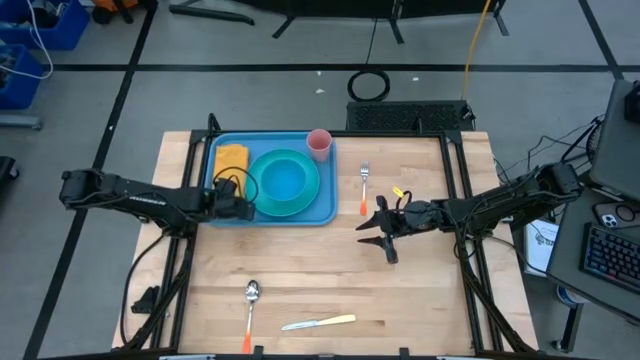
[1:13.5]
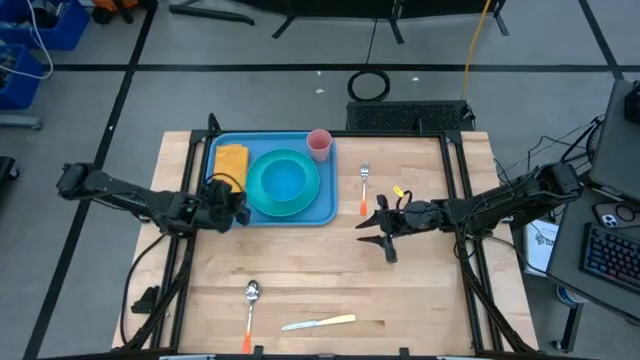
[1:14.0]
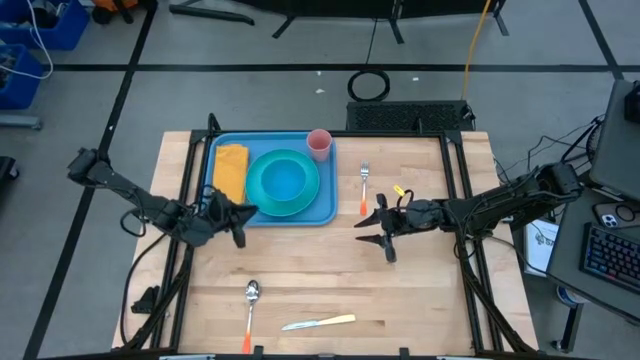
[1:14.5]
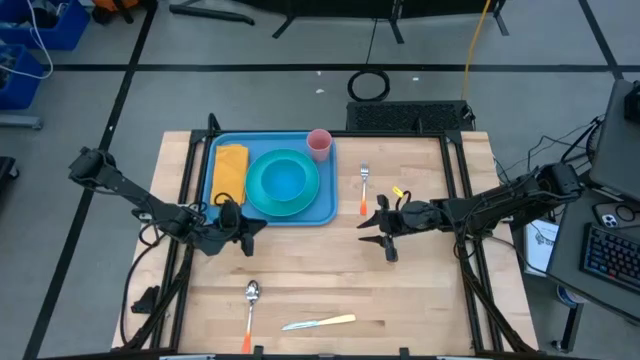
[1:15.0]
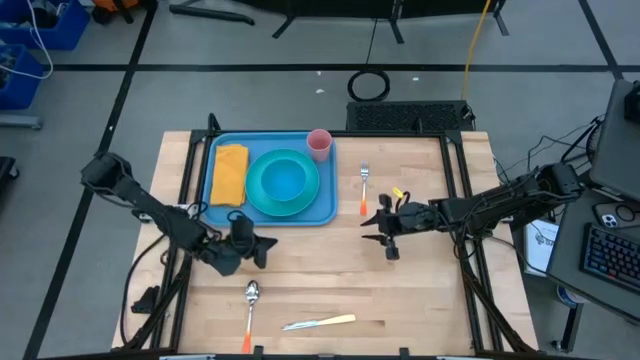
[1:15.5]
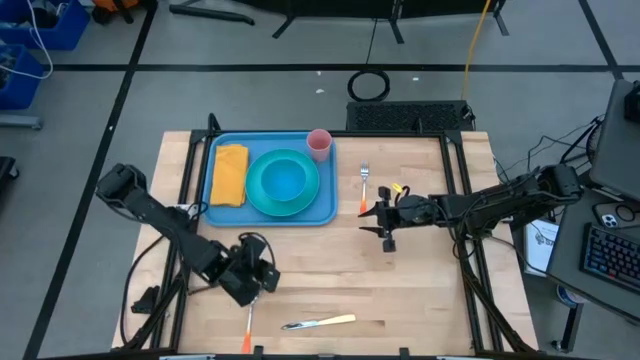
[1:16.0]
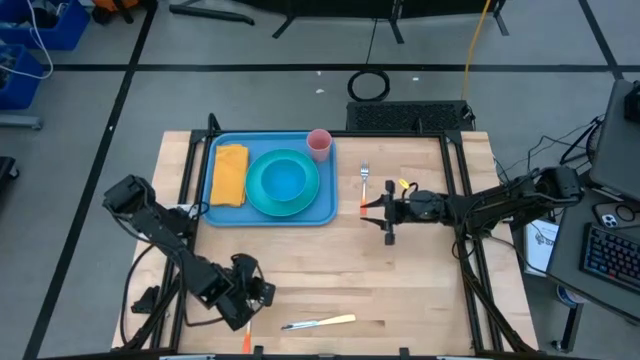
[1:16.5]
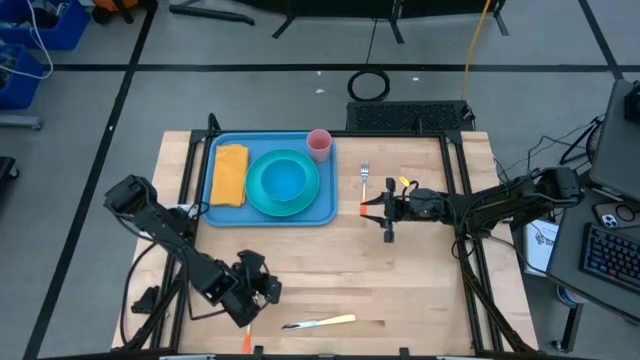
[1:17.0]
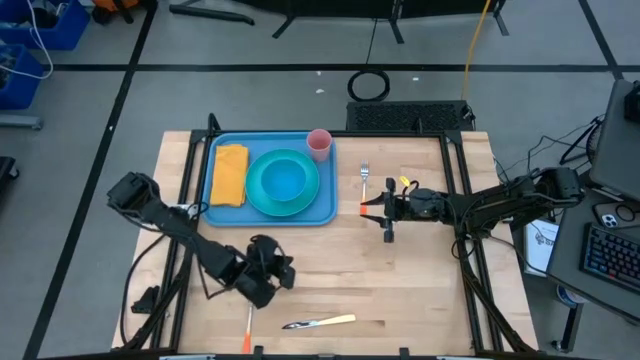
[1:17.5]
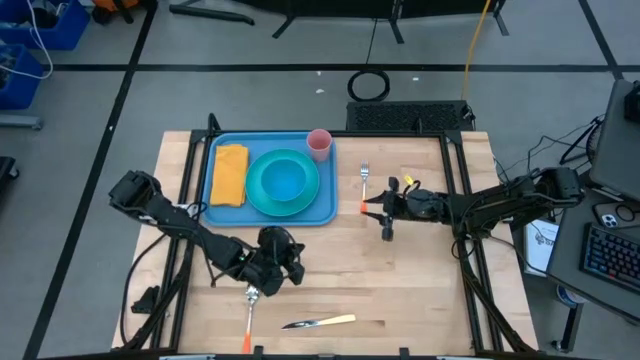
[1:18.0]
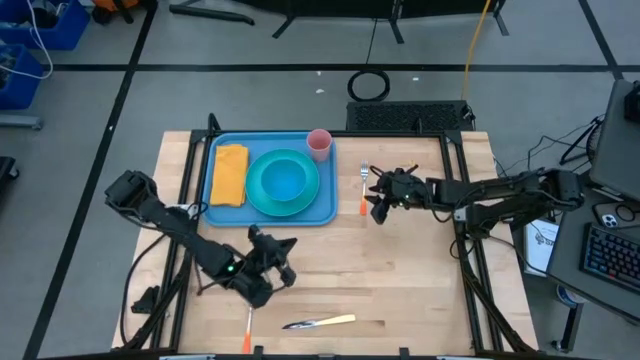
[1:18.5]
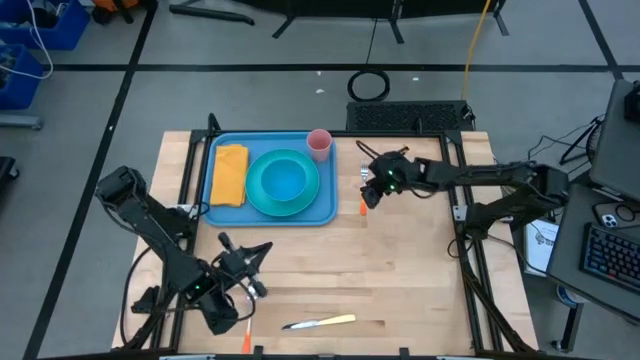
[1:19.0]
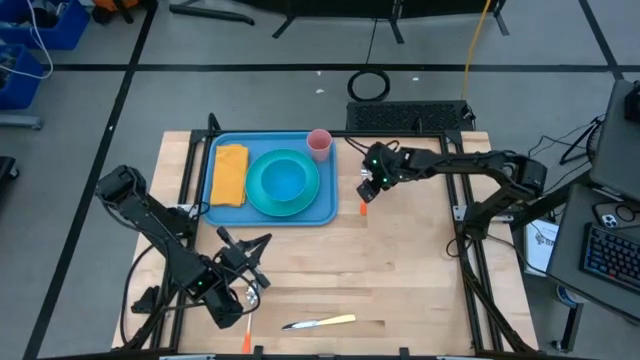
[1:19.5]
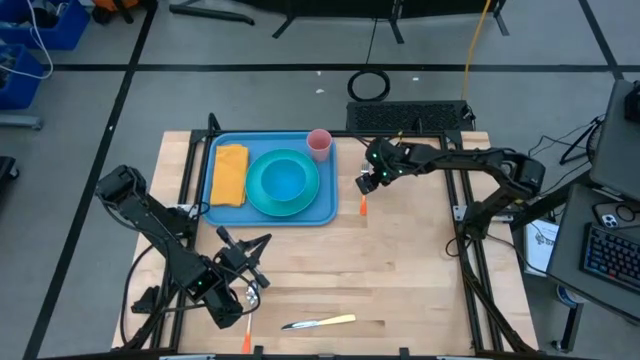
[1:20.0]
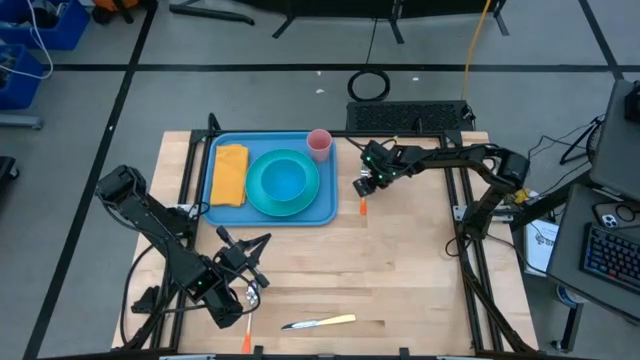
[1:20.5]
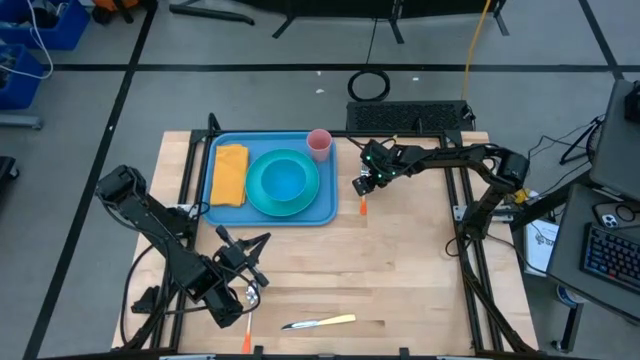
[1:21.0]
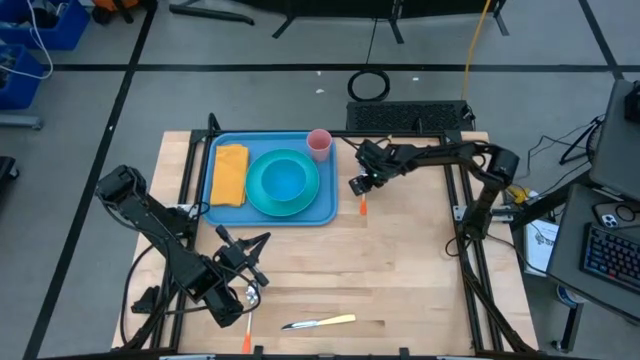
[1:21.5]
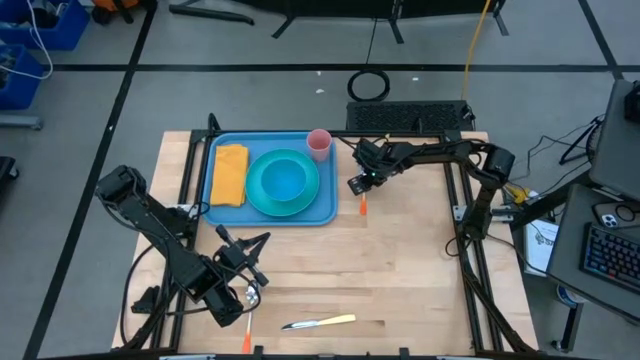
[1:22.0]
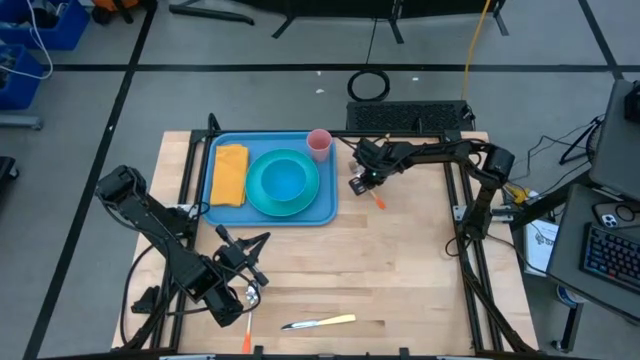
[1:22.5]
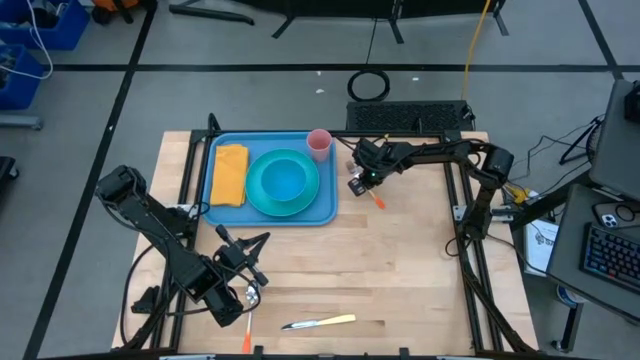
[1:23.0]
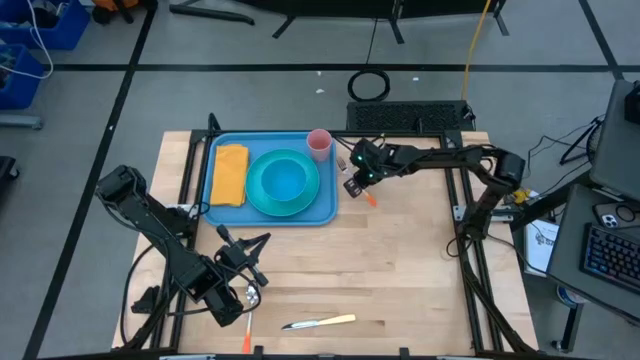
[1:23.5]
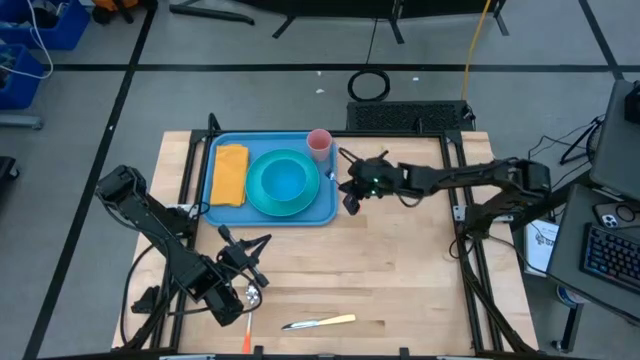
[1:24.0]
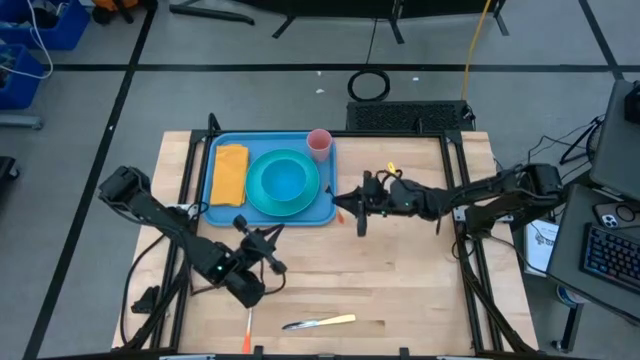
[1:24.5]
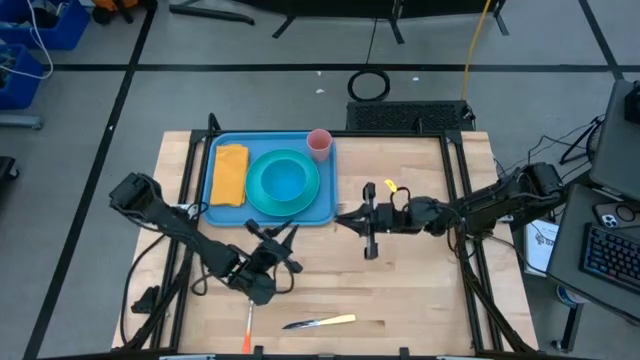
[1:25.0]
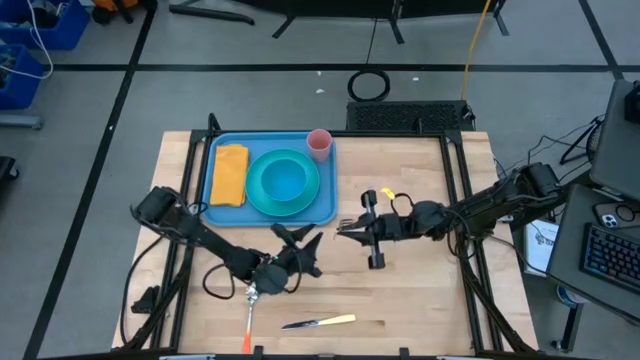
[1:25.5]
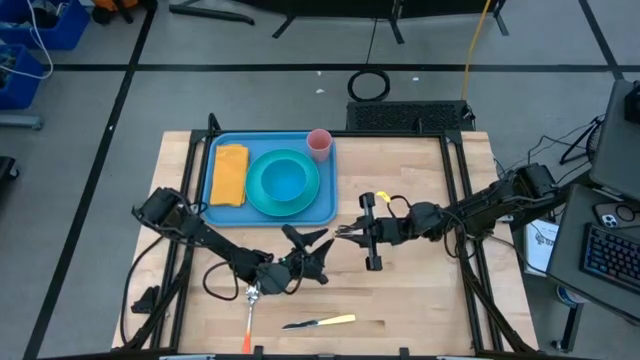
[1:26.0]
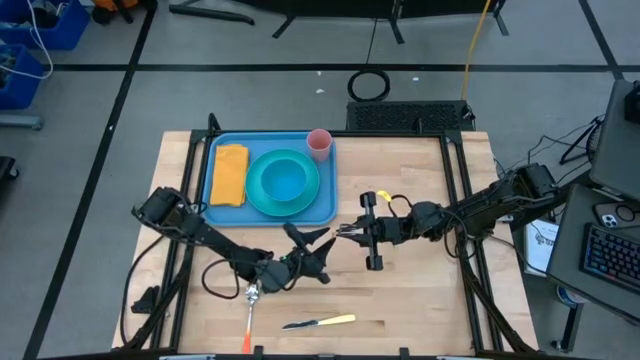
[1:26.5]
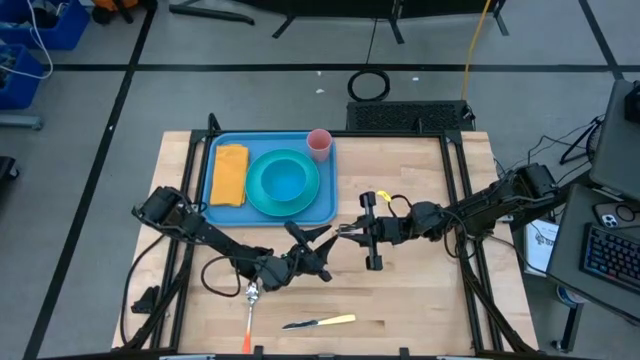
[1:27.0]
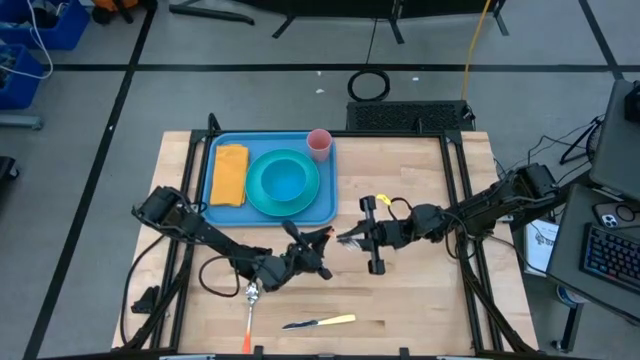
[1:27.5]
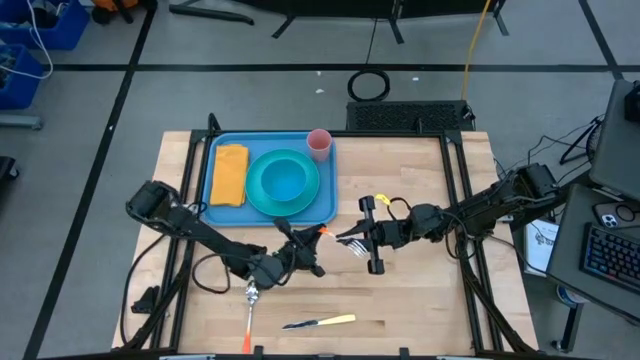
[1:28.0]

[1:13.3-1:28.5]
Task: Set up tray
Put the orange fork on the yellow napkin on the blue serving tray

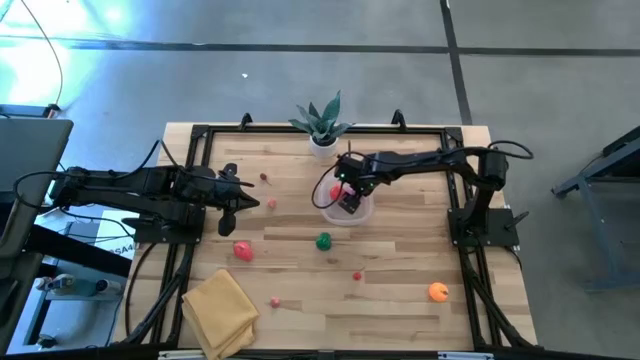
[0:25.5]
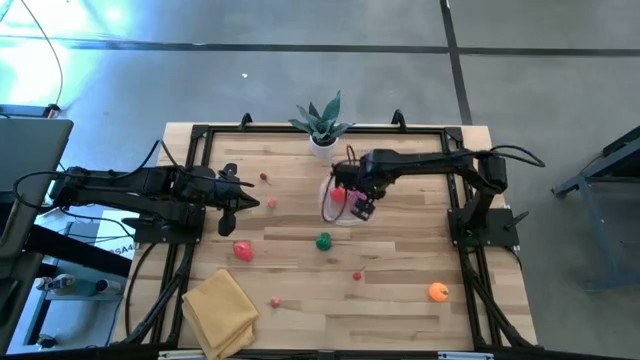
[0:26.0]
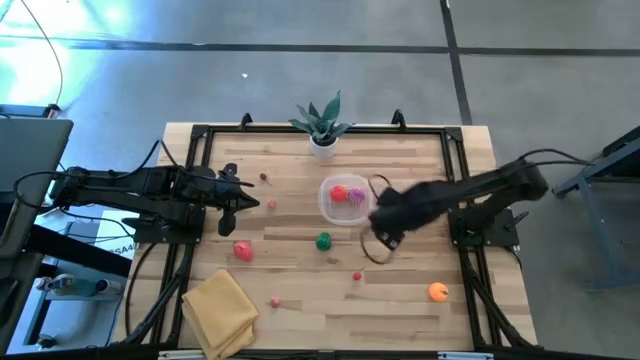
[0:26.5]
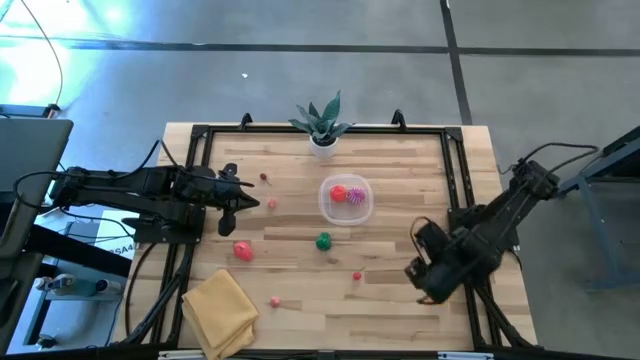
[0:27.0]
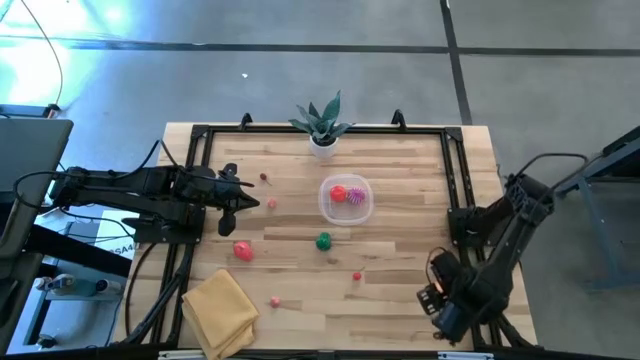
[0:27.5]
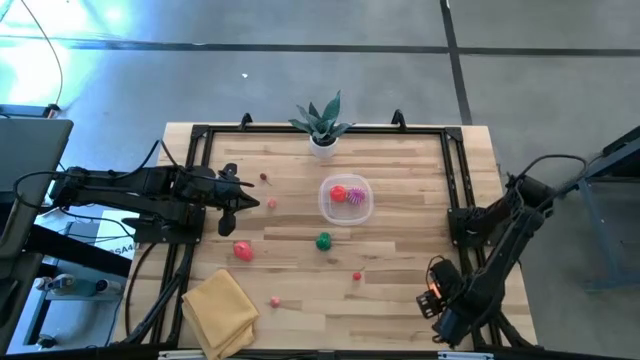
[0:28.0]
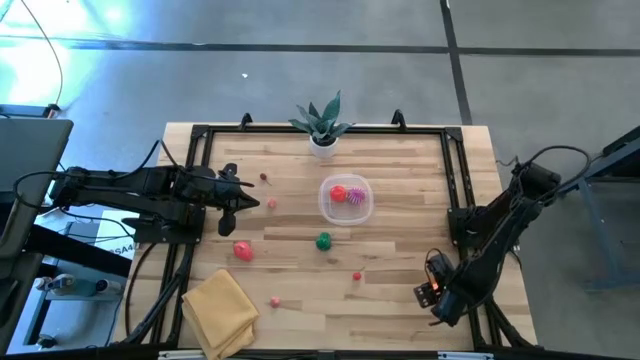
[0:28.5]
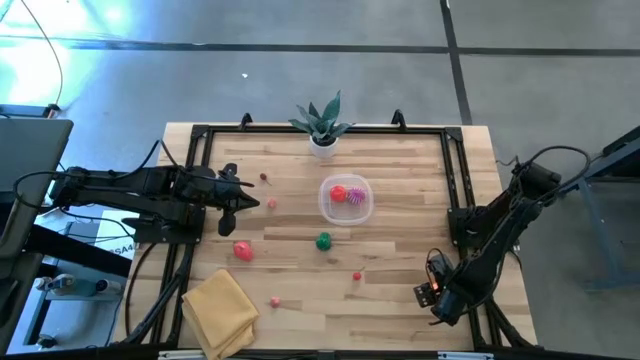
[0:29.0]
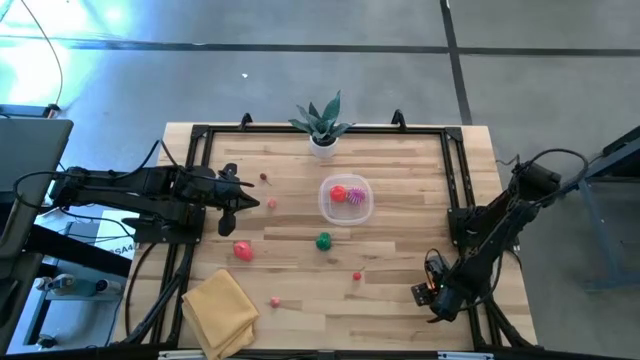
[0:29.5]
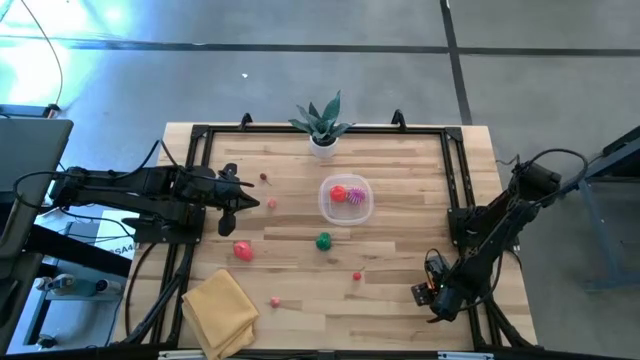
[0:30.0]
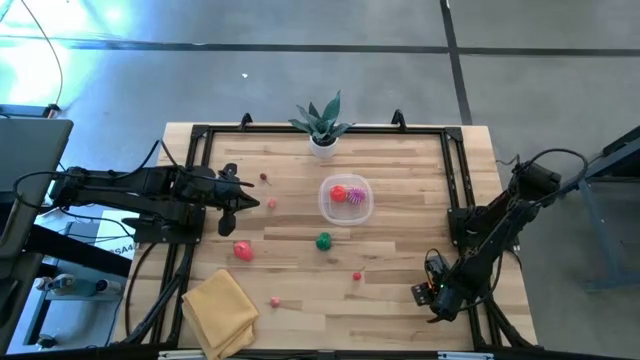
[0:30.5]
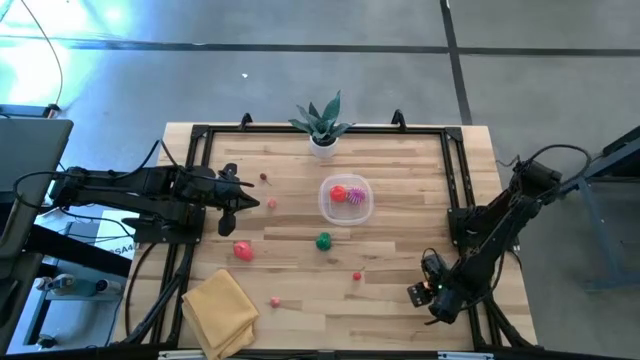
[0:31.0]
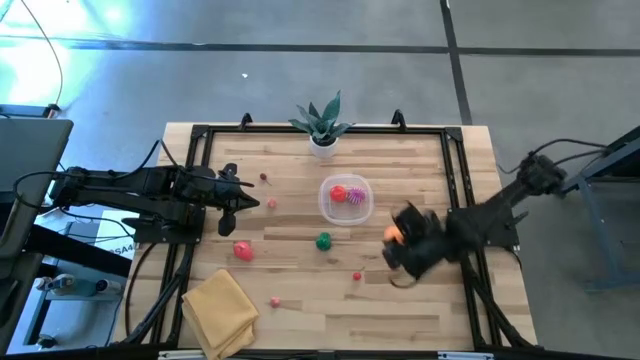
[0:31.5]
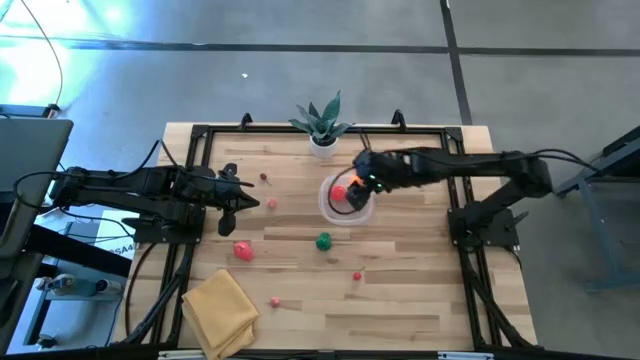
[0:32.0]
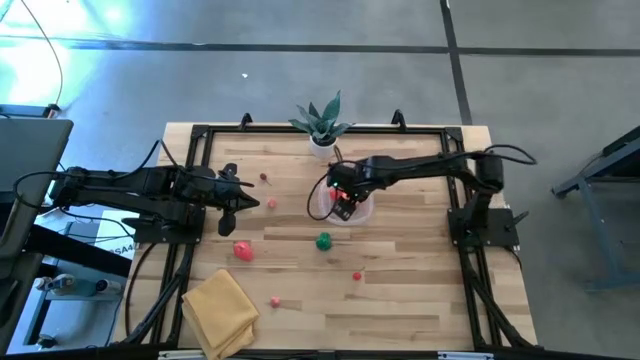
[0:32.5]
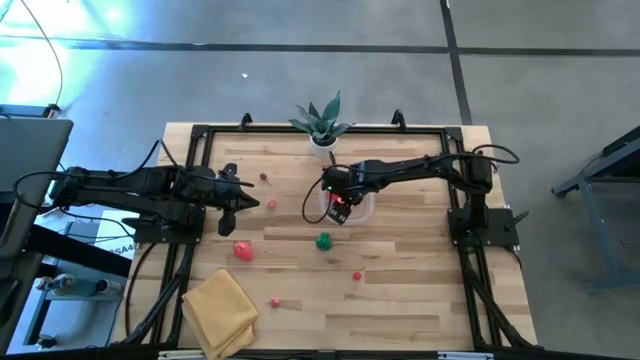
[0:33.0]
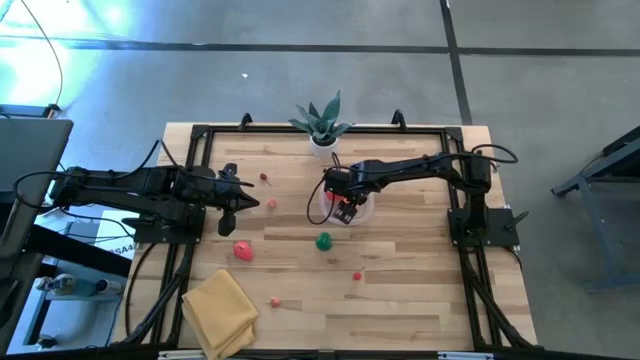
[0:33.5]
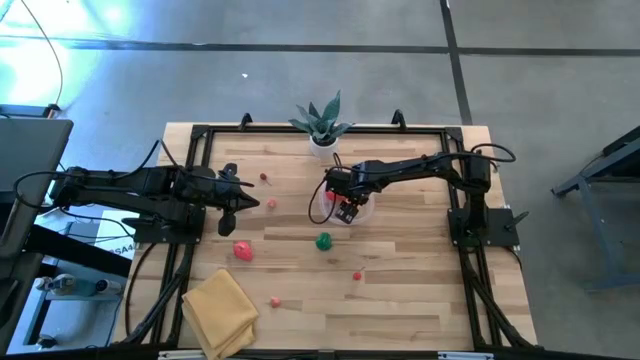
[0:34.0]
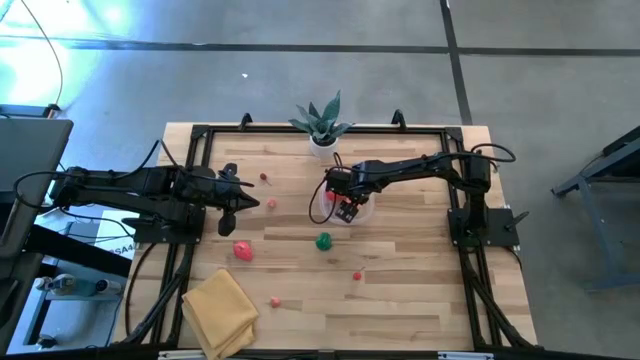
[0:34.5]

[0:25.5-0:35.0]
Task: Pick and placing Produce into tupperware
Put the orange into the transparent container
